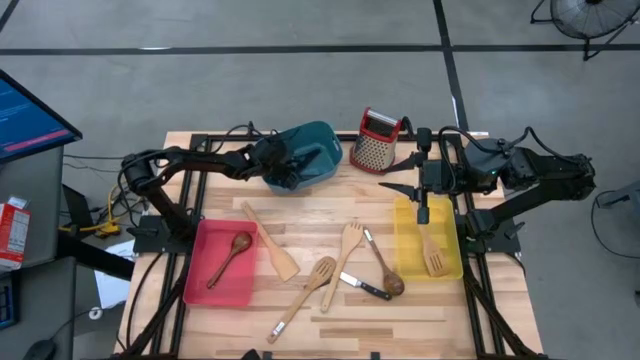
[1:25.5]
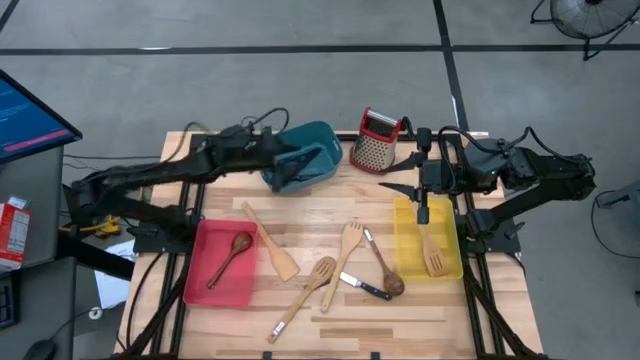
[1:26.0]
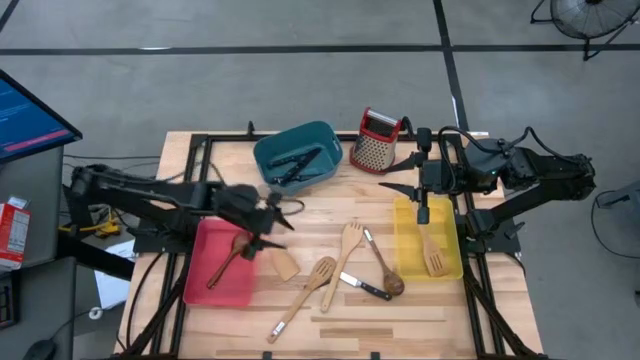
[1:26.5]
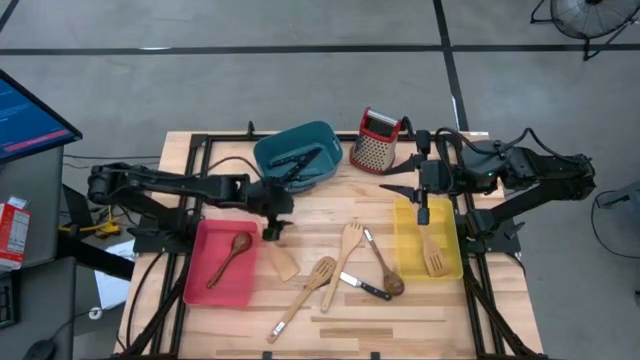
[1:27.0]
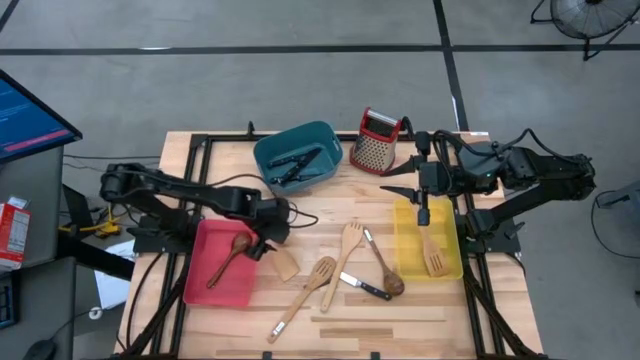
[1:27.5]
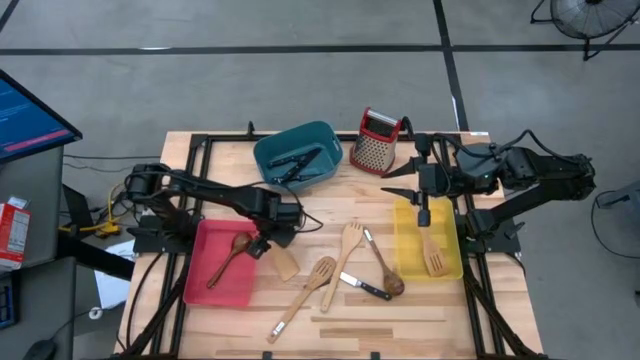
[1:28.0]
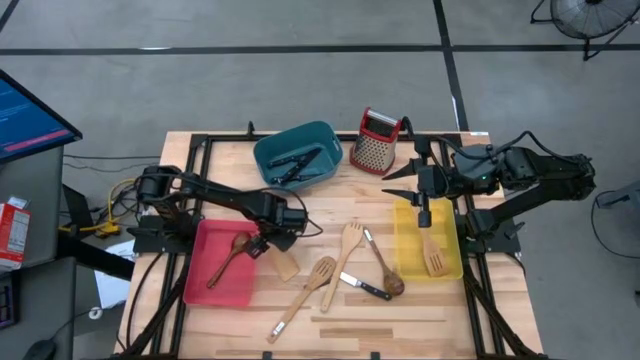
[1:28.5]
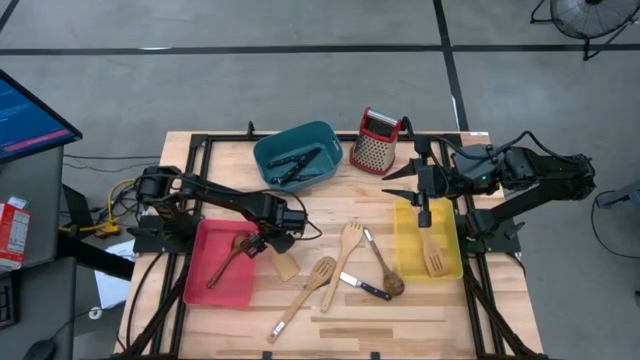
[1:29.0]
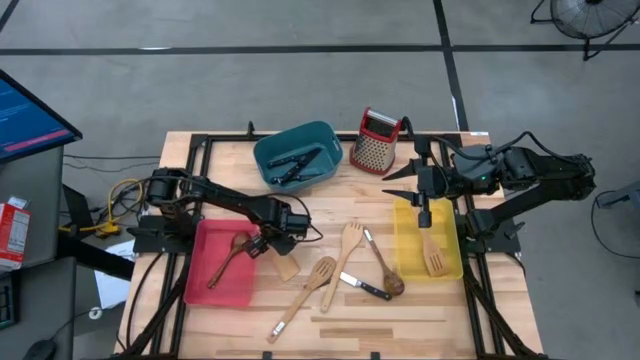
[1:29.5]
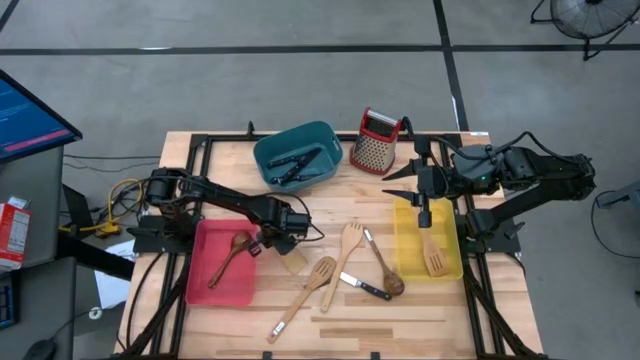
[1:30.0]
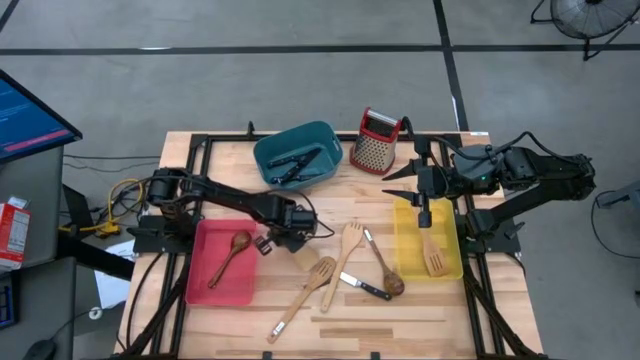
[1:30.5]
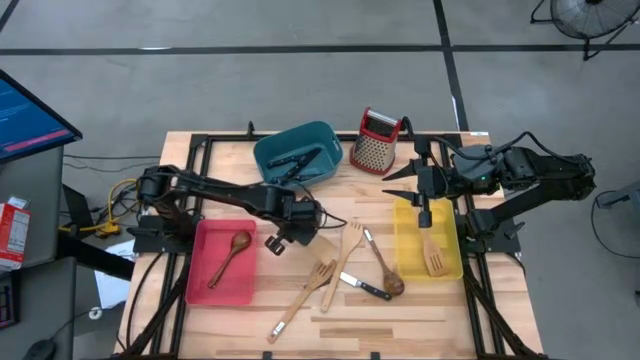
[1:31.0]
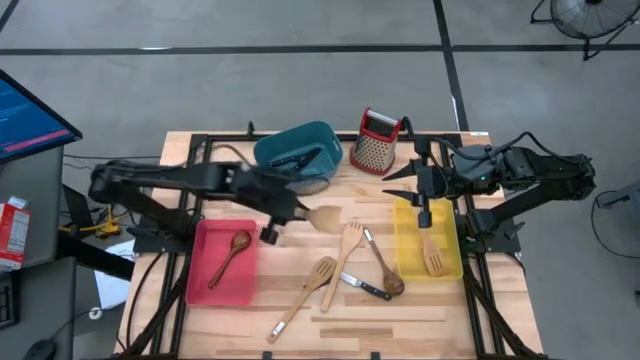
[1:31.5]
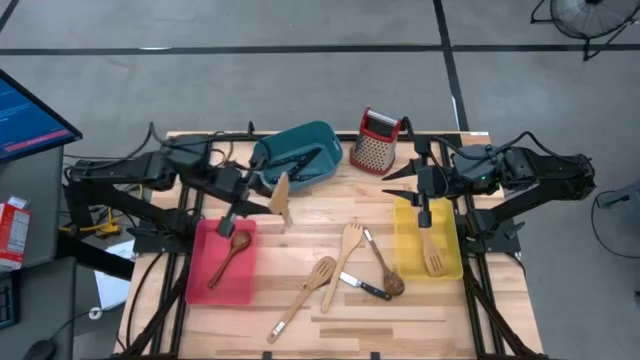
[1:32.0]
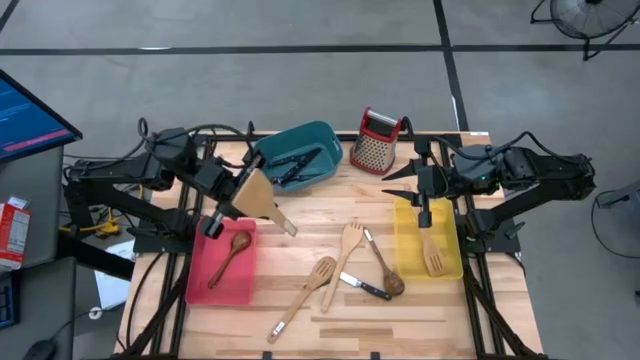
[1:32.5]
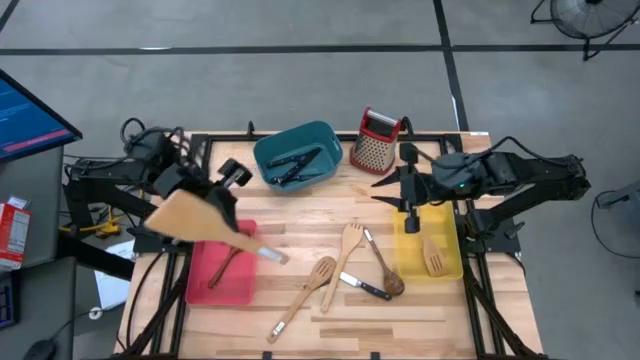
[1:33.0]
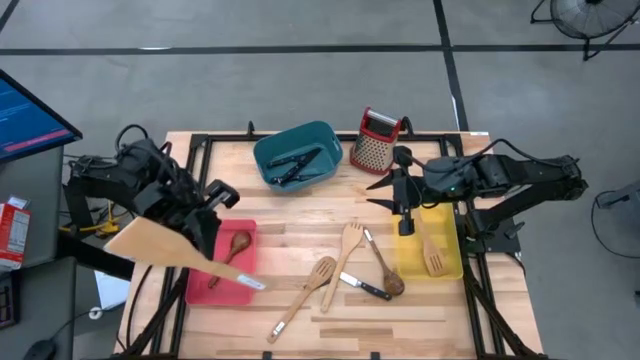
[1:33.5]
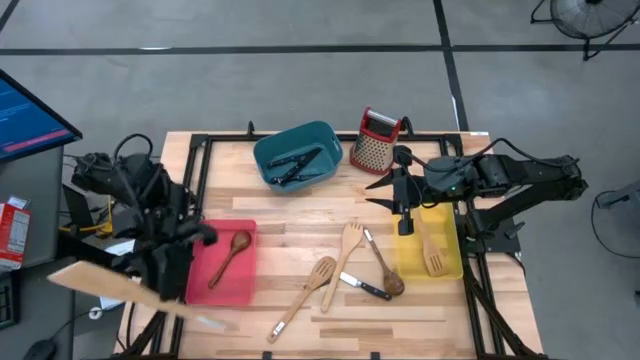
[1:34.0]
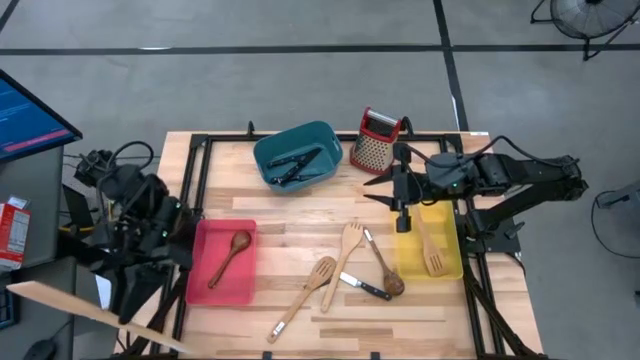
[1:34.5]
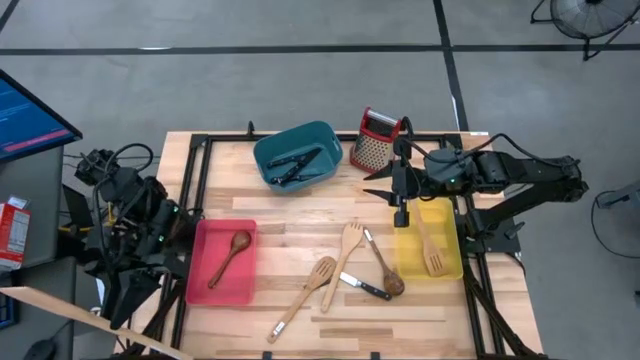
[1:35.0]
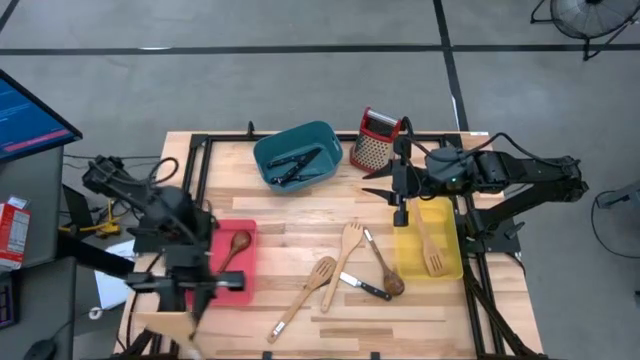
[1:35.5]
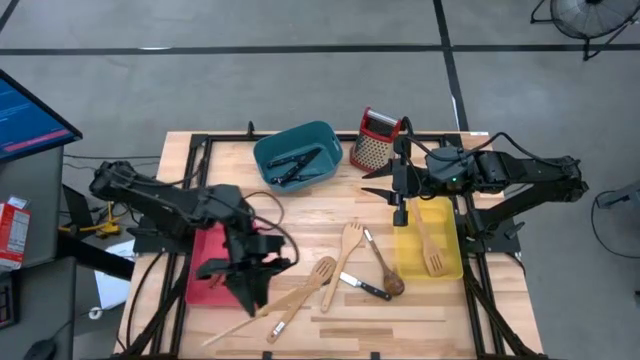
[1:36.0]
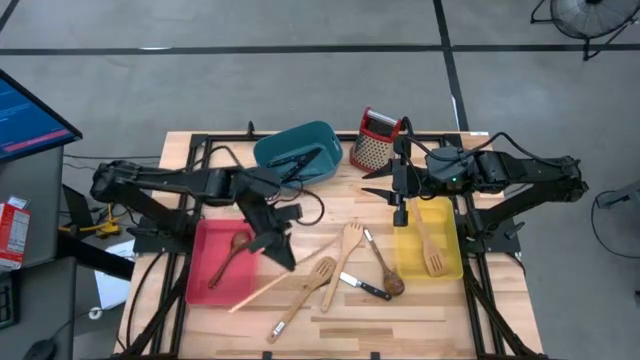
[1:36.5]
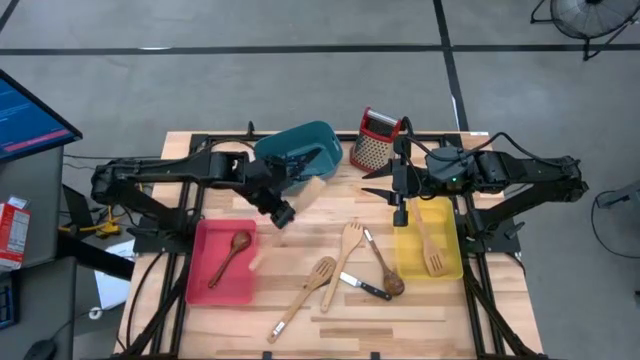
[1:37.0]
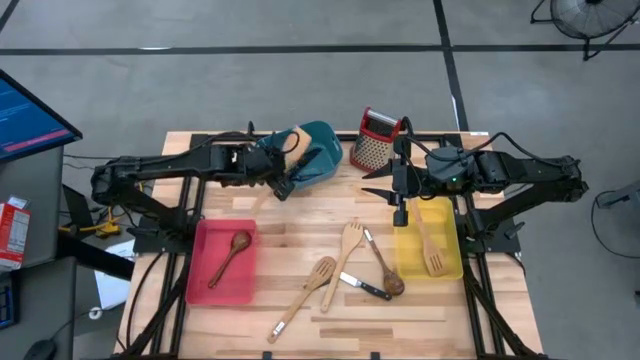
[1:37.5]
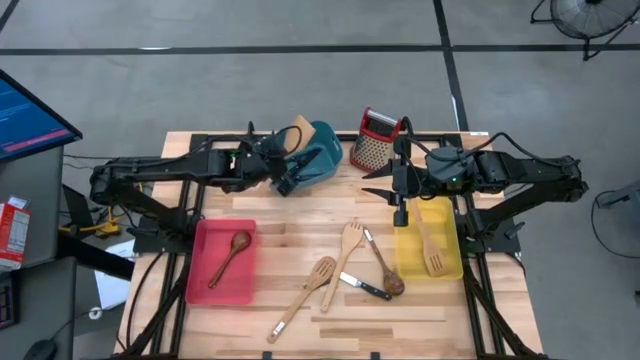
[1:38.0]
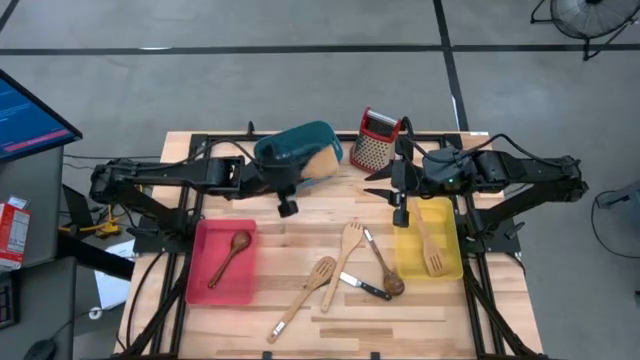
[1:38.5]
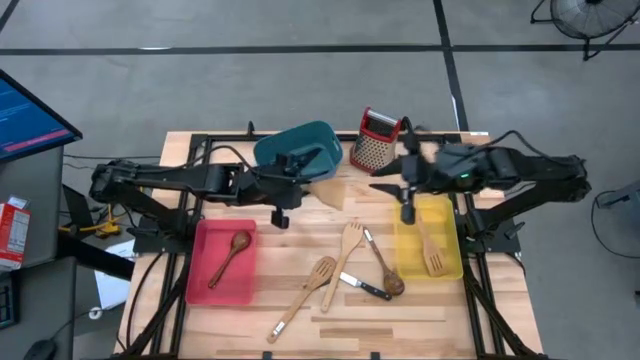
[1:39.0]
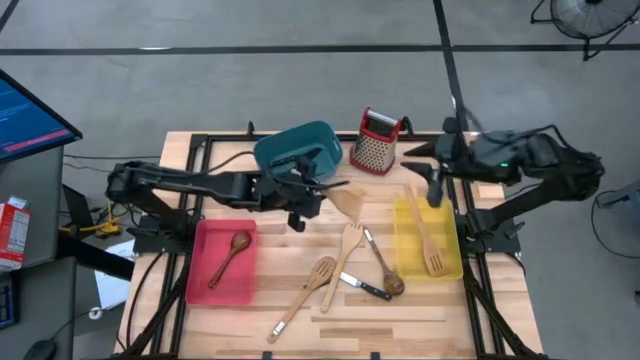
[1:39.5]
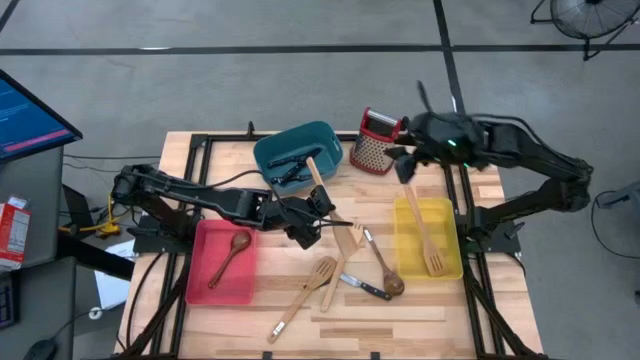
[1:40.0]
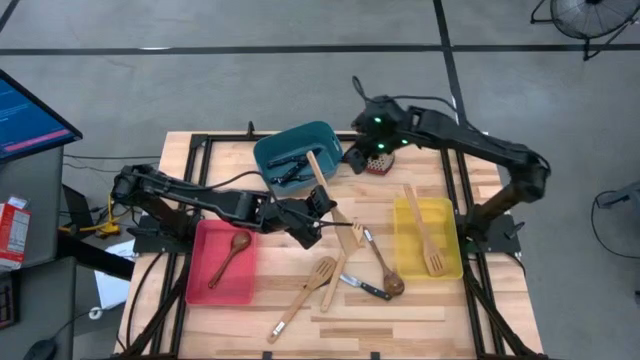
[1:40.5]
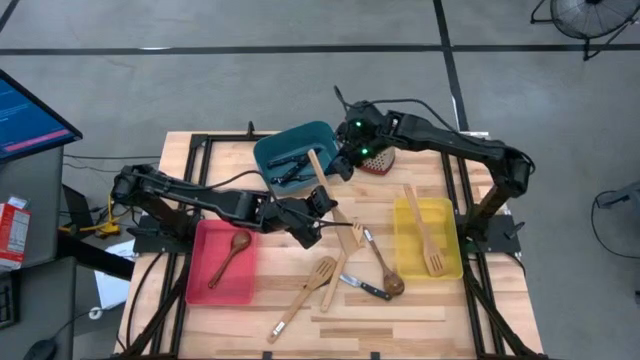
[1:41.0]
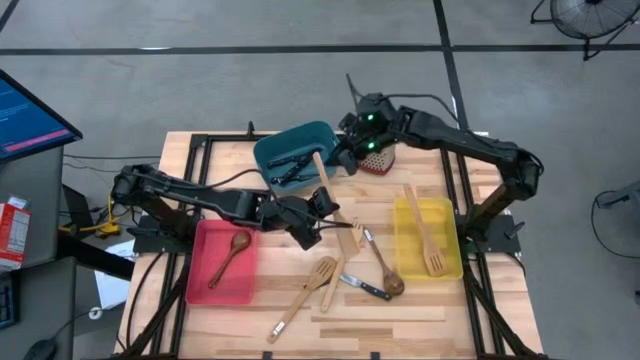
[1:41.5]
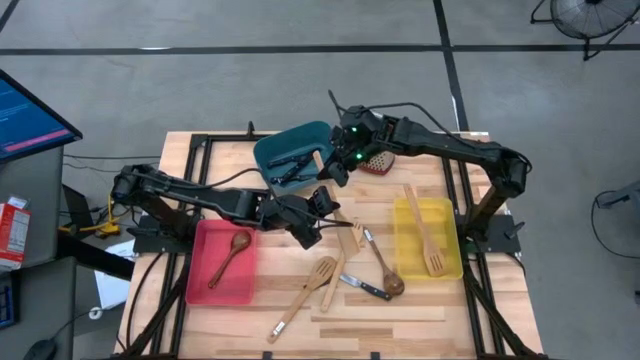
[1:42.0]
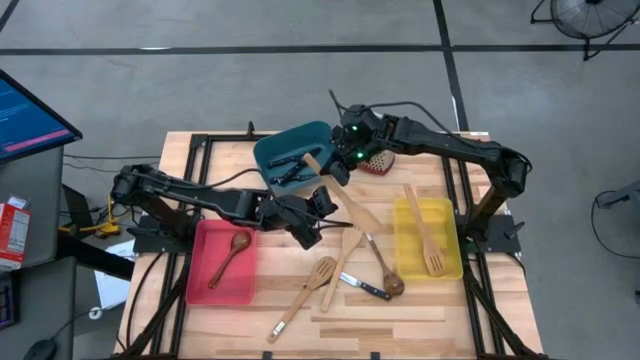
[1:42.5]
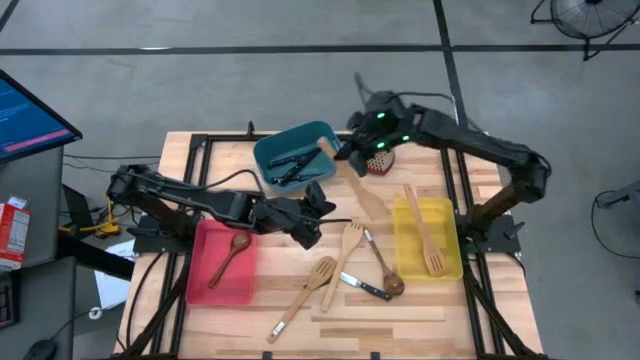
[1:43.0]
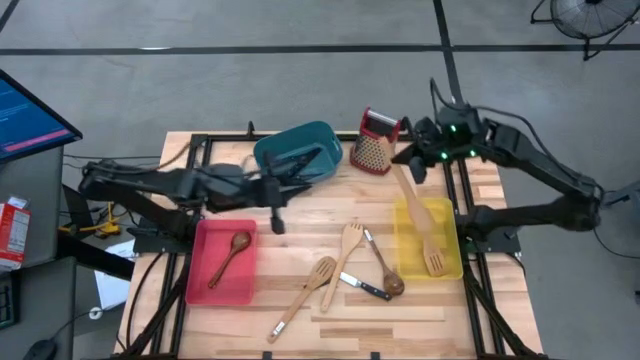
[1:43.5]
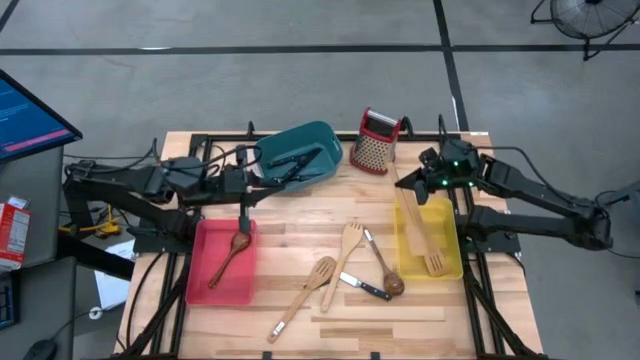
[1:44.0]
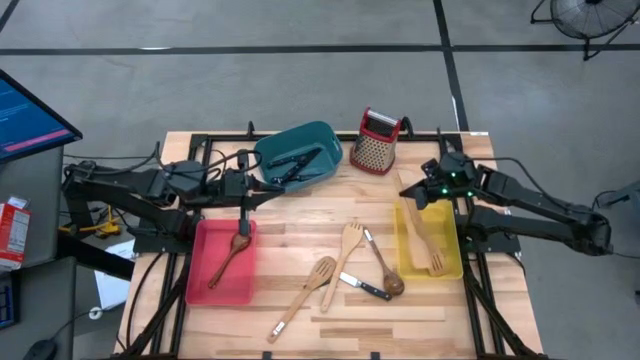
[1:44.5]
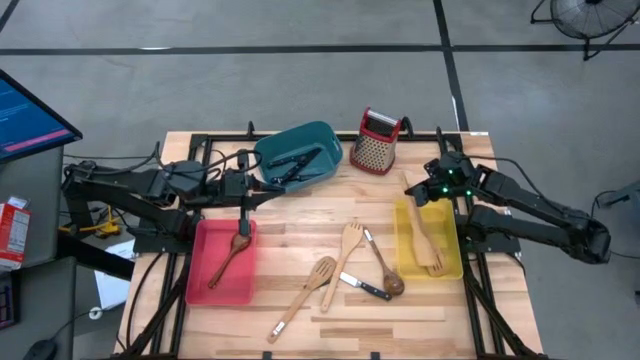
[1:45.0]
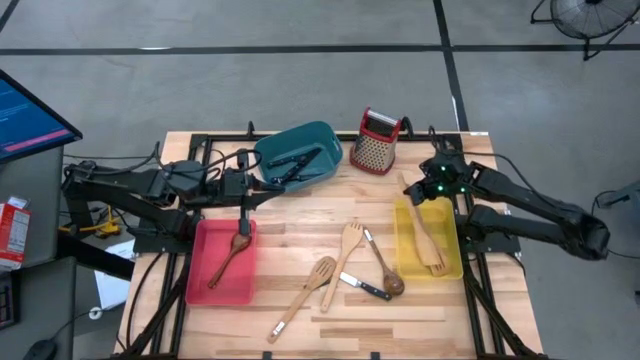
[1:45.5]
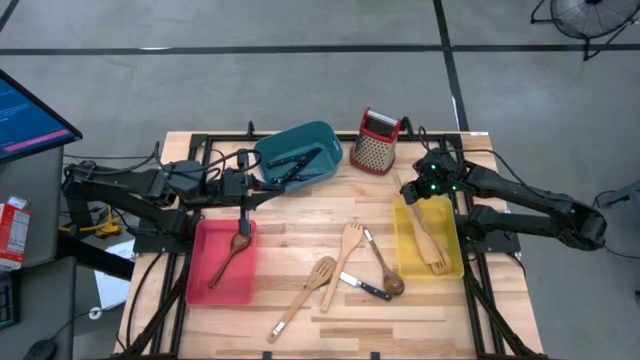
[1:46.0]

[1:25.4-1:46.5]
Task: Pick & Place Kitchen Items
Put the brown spatula into the wooden bin
